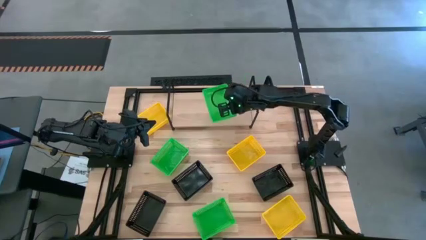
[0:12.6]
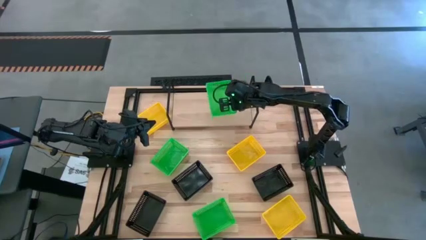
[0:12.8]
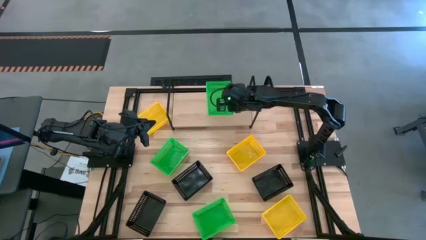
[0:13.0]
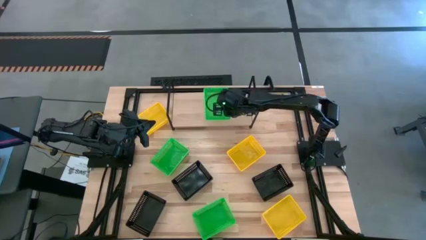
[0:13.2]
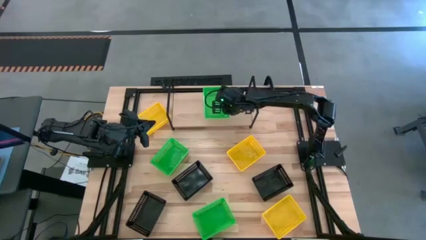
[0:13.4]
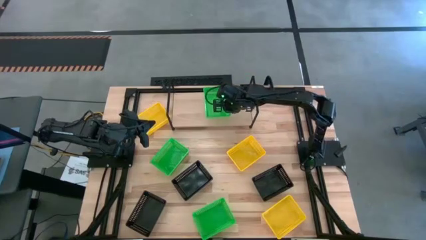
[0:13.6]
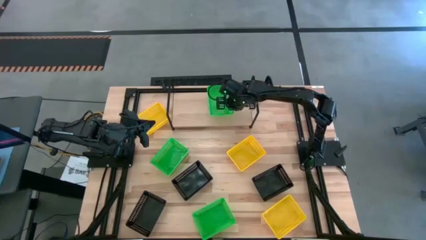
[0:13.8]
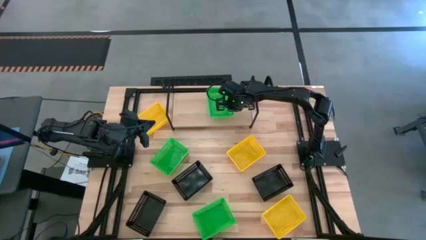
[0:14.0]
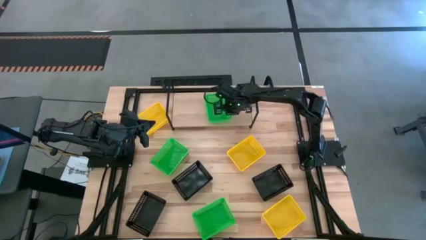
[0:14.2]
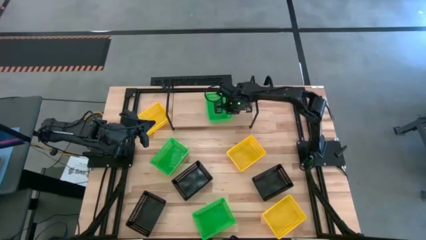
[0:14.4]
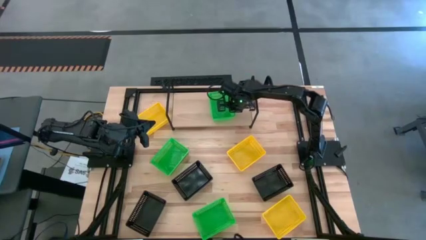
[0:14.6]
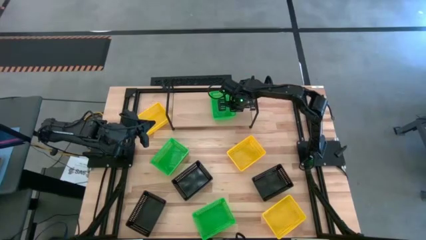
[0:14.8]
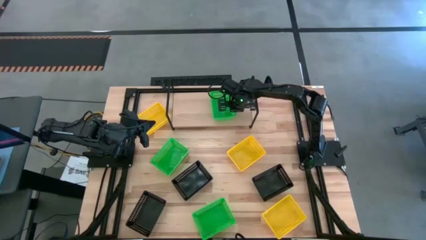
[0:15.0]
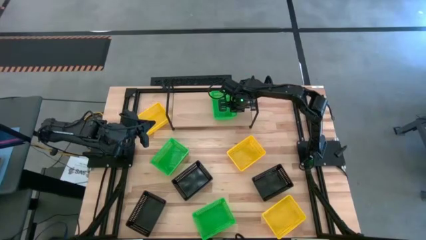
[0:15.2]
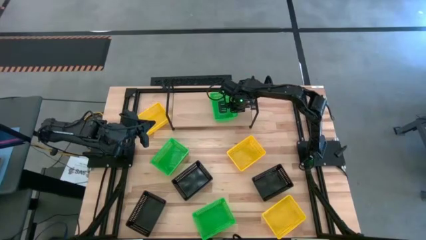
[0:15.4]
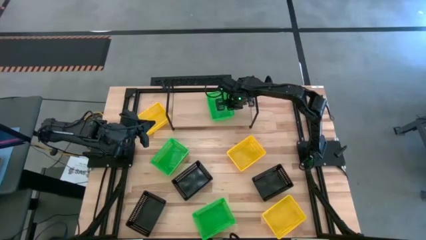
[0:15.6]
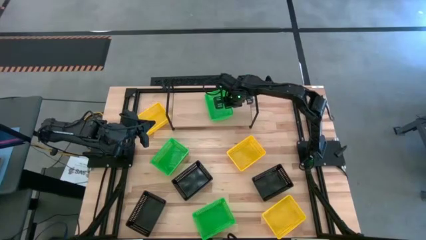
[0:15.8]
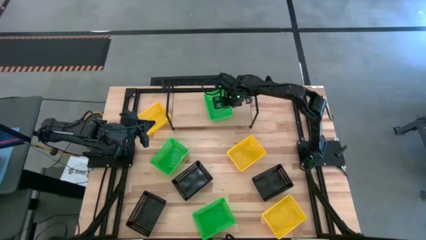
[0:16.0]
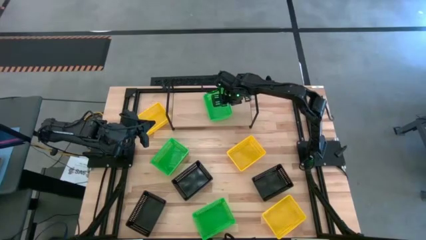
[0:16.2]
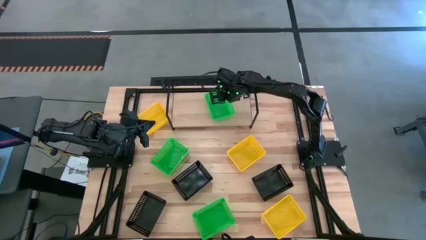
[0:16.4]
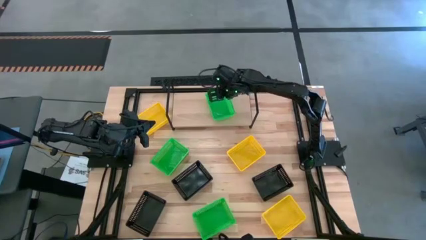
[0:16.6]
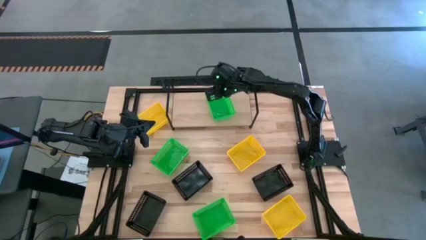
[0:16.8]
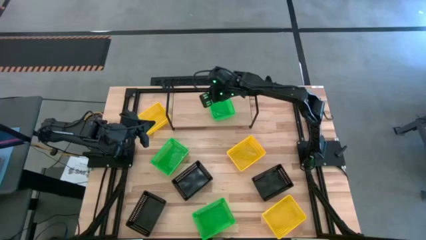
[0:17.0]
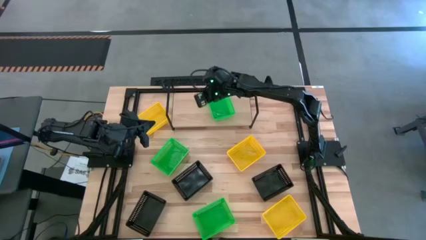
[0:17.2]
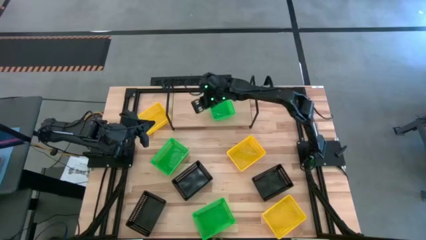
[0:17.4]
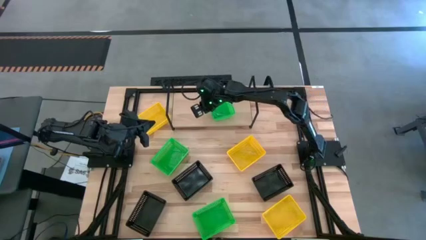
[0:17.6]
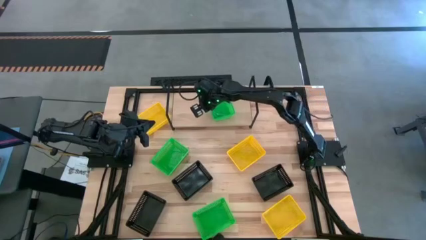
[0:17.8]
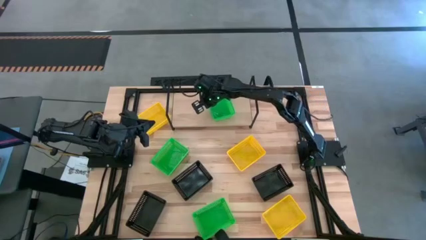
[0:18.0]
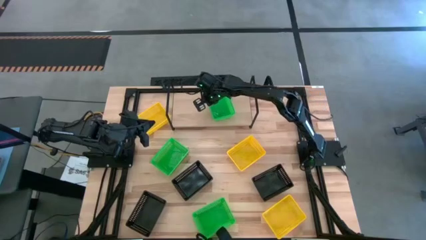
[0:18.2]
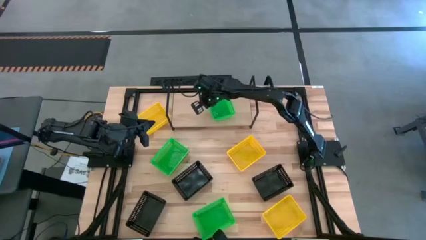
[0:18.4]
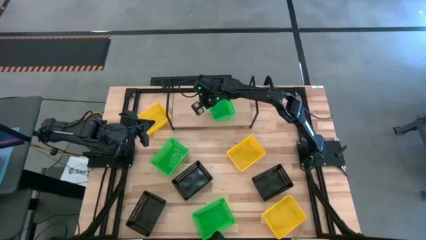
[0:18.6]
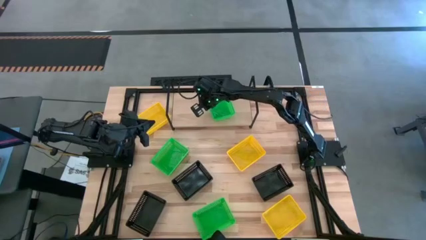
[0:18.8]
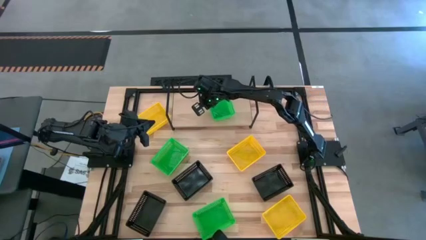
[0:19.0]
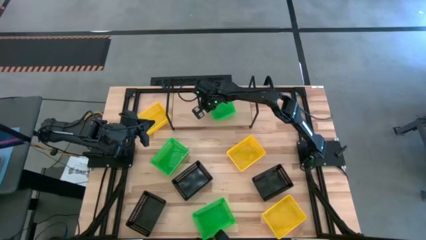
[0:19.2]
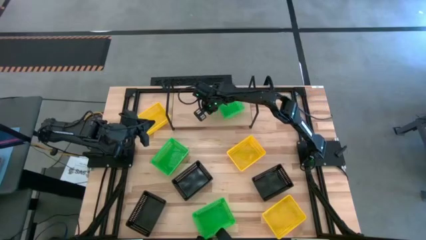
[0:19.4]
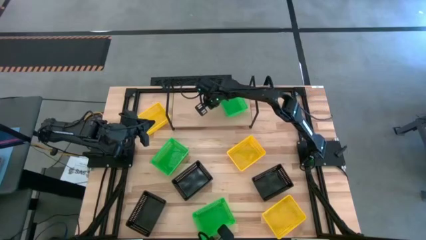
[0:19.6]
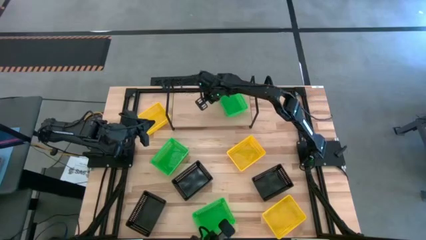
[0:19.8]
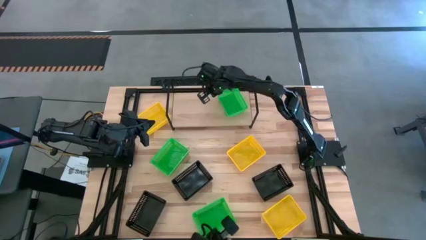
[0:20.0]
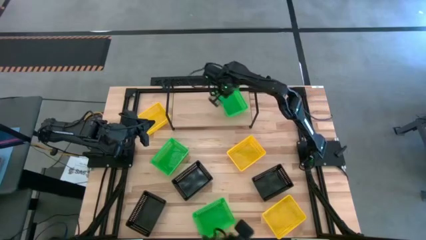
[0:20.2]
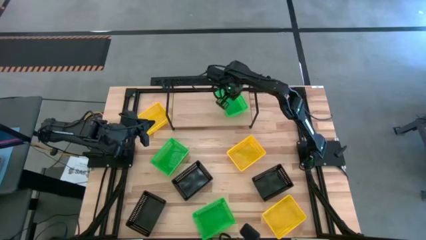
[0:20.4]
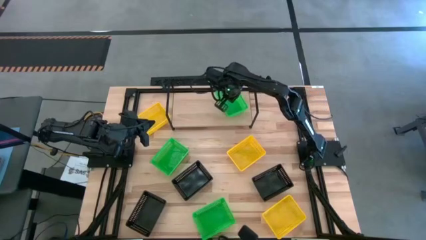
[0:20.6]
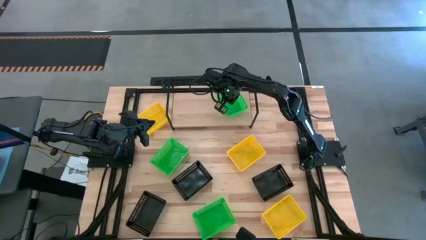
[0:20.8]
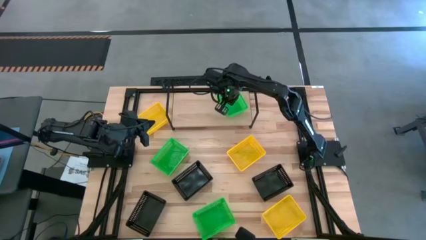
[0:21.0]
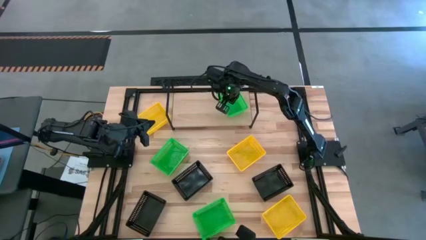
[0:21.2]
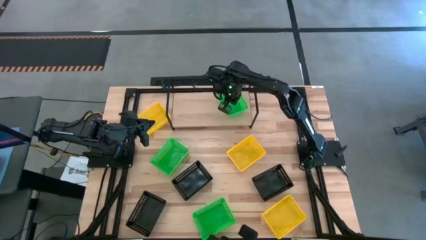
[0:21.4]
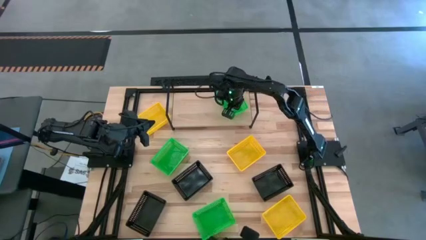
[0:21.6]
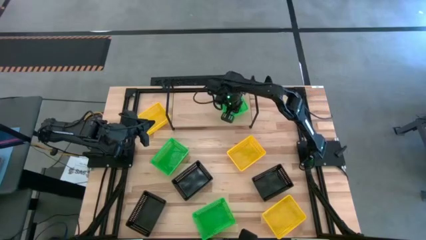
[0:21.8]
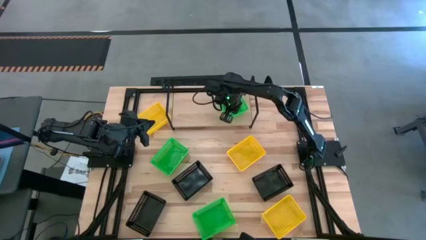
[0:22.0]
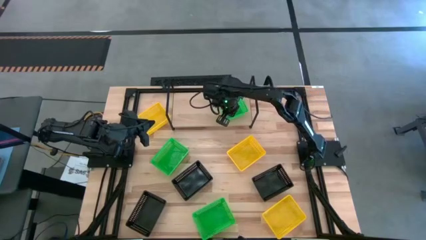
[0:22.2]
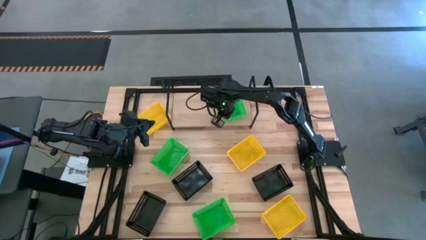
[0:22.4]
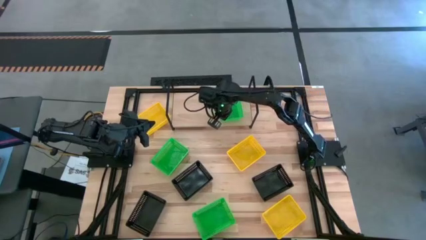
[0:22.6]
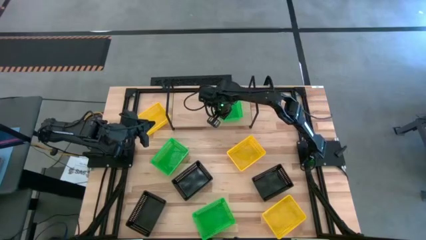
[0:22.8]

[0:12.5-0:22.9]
Task: Stack baskets on shelf by color
Put the top right green bin on the shelf

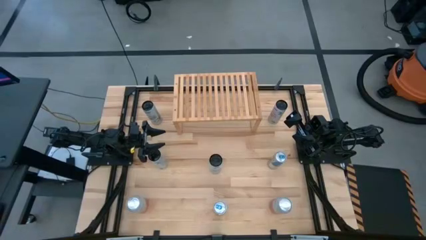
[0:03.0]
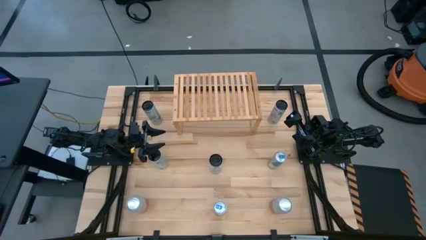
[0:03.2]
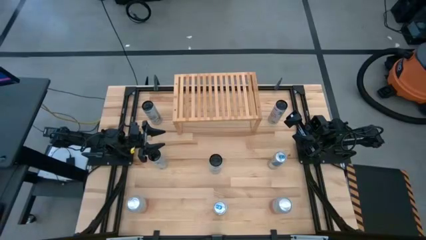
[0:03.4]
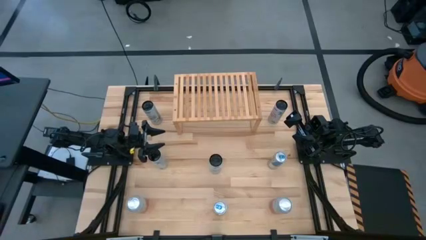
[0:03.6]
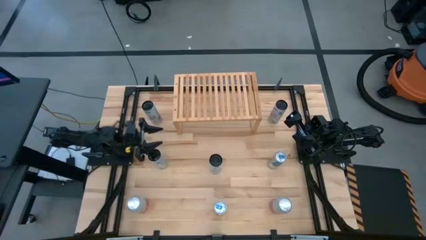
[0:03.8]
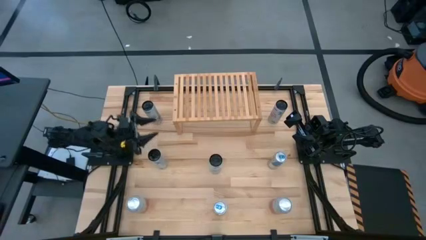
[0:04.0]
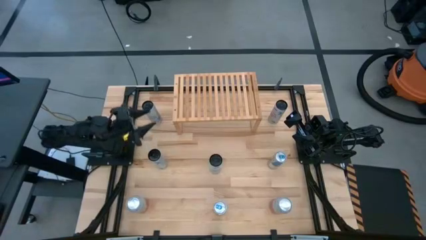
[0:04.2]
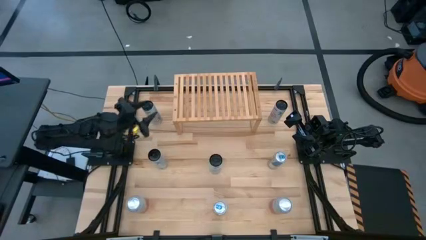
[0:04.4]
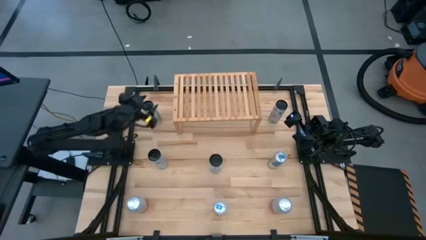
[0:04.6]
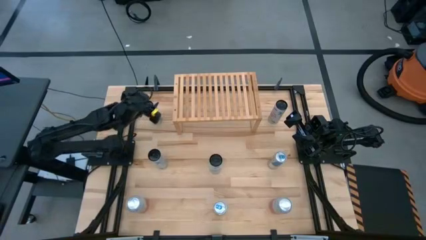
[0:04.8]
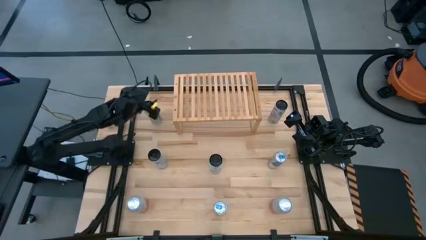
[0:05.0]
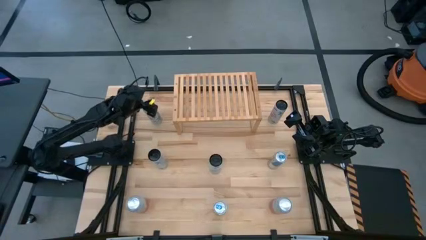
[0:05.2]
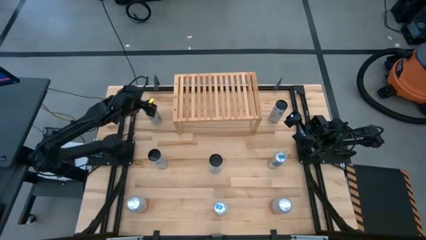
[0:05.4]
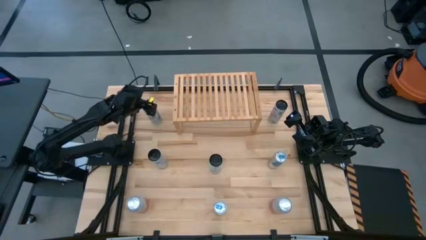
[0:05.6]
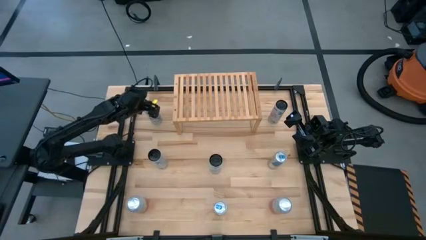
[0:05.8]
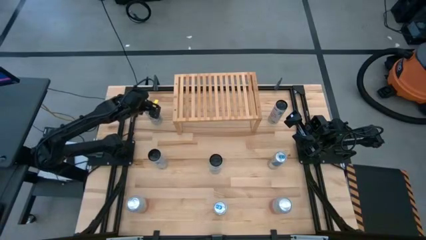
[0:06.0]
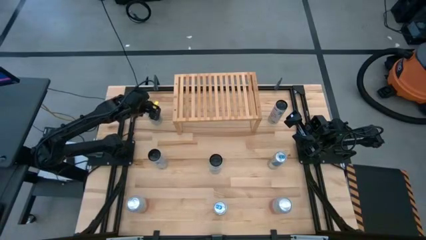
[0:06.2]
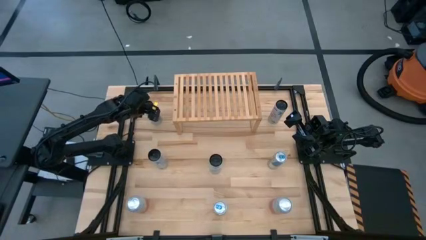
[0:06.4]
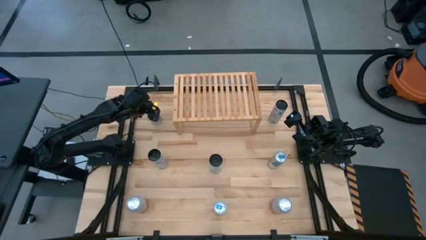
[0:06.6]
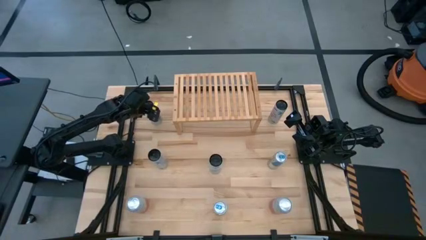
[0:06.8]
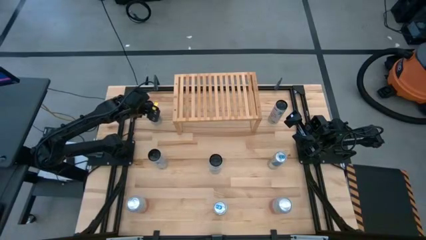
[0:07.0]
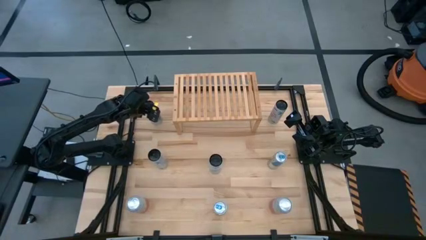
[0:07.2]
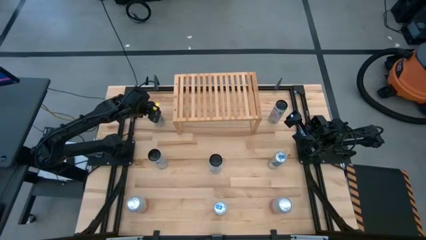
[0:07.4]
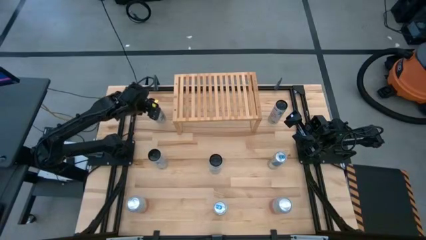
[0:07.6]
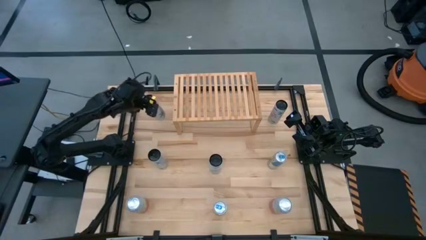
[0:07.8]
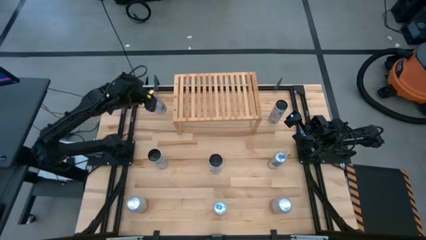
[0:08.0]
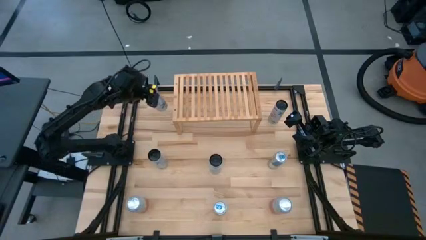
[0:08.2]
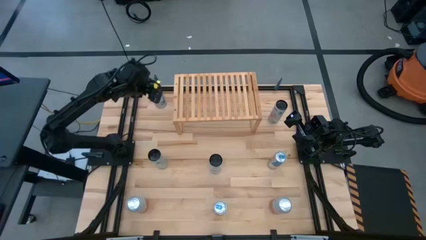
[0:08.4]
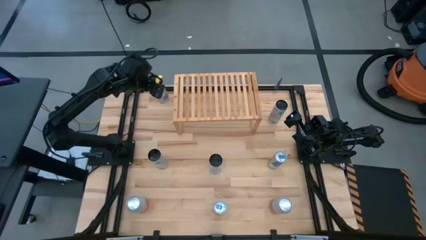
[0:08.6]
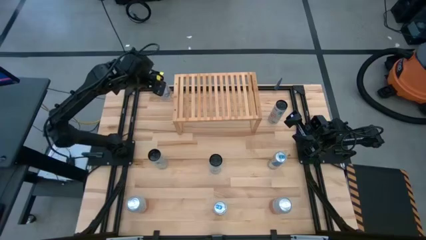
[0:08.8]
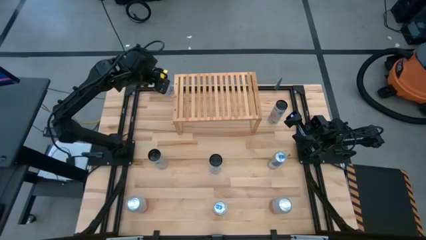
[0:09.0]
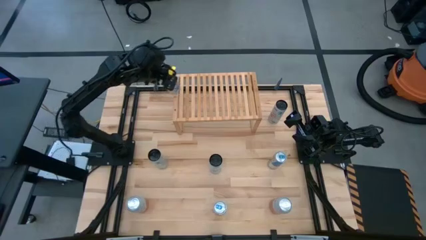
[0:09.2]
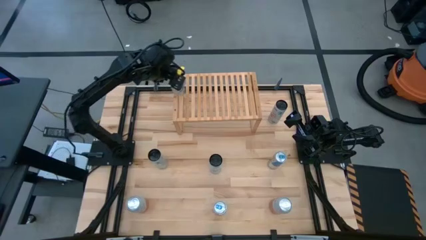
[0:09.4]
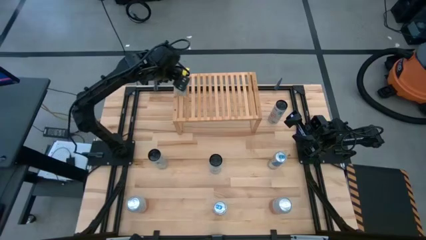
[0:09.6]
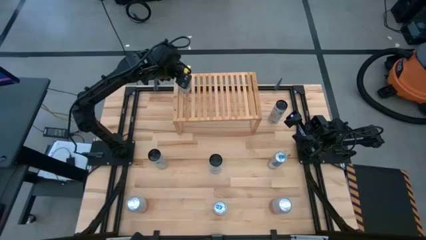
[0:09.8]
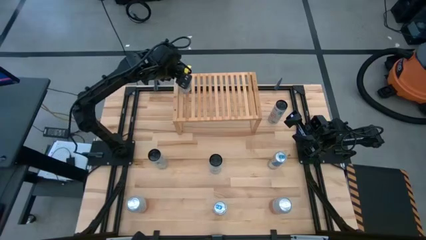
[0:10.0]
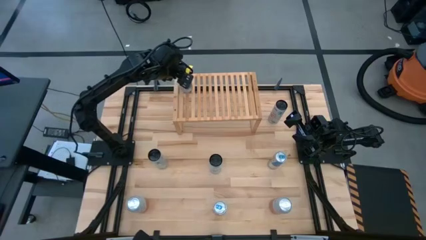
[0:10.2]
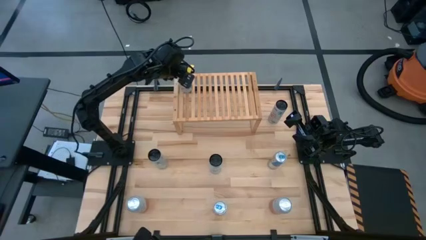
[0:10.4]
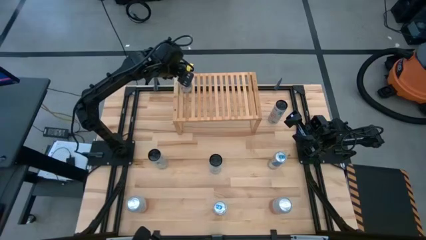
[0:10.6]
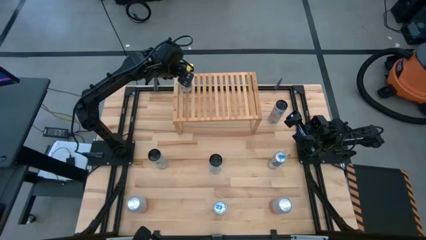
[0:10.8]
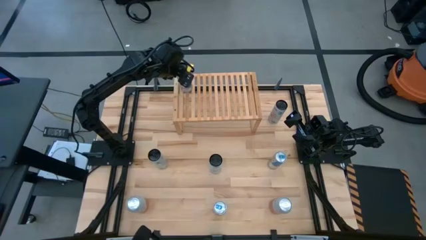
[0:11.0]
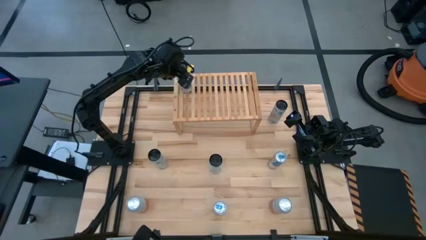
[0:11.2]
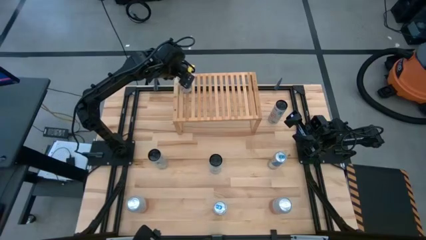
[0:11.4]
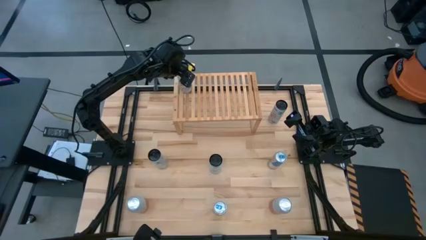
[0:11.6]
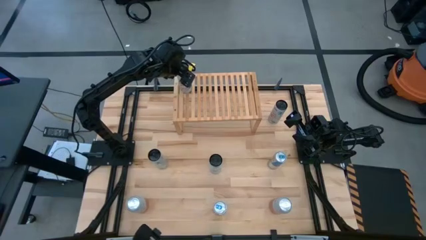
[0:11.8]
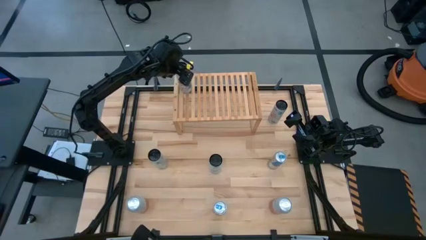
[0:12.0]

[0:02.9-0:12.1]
Task: Place canned beverage on shelf
Put the white-blue soda can on the shelf aligned with the other white-blue soda can
